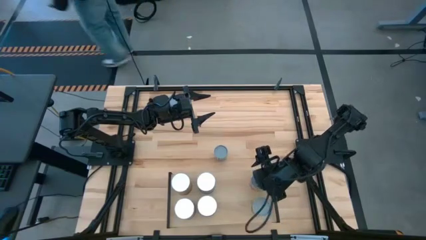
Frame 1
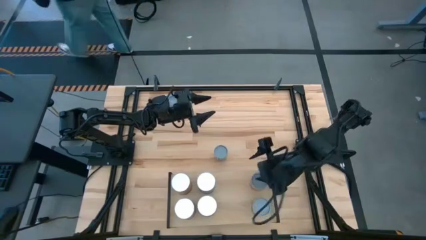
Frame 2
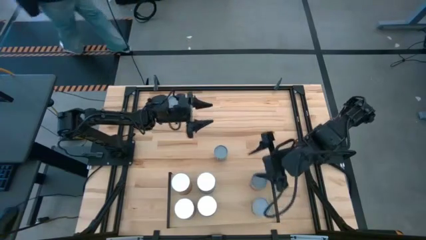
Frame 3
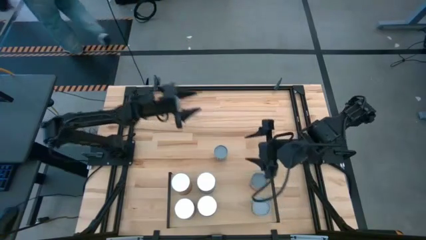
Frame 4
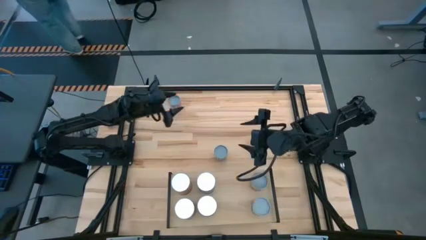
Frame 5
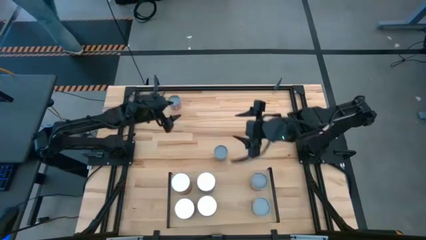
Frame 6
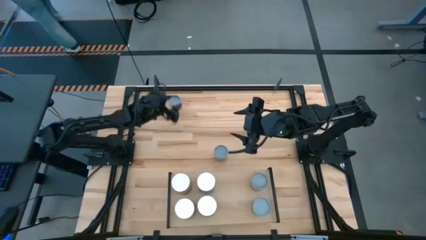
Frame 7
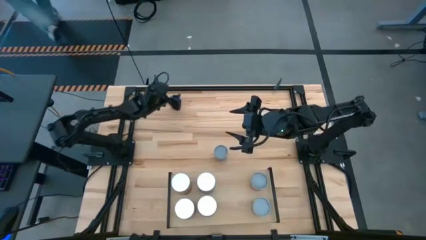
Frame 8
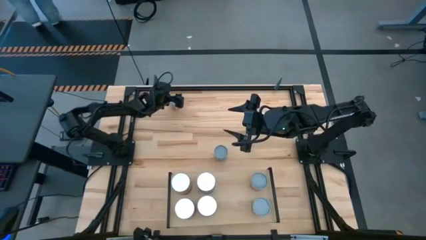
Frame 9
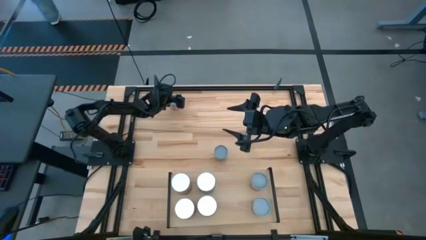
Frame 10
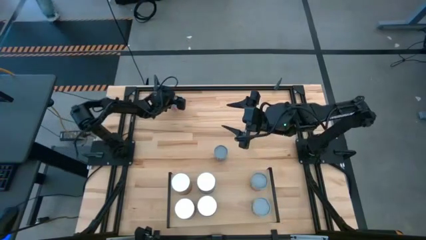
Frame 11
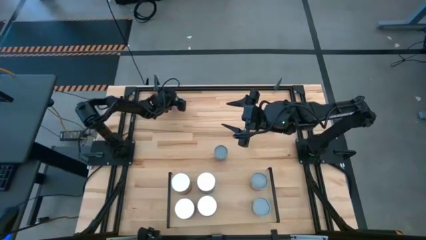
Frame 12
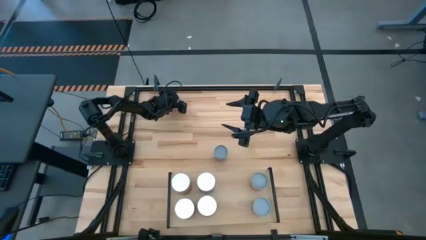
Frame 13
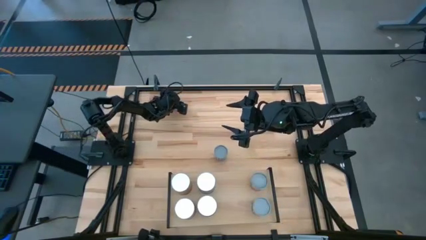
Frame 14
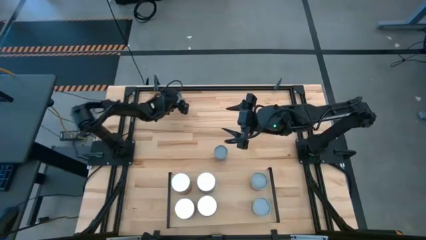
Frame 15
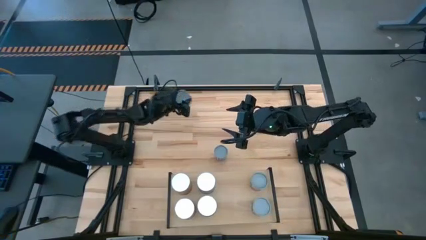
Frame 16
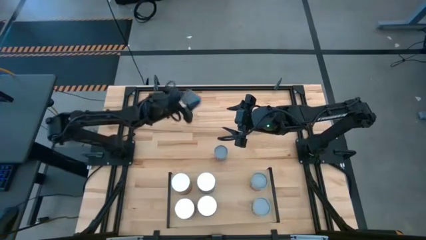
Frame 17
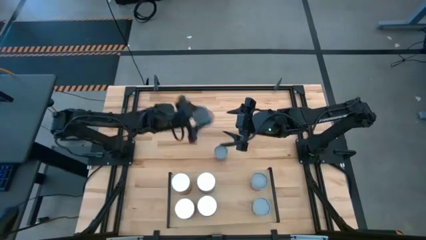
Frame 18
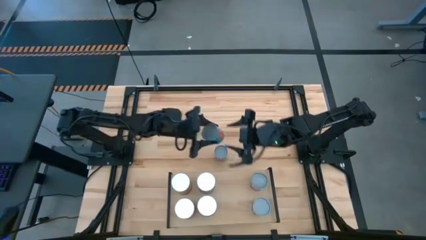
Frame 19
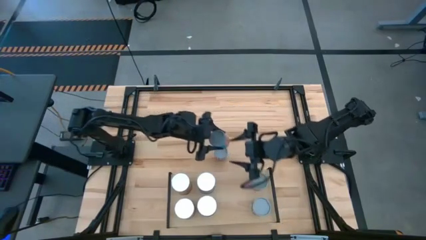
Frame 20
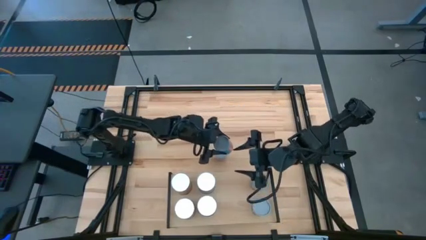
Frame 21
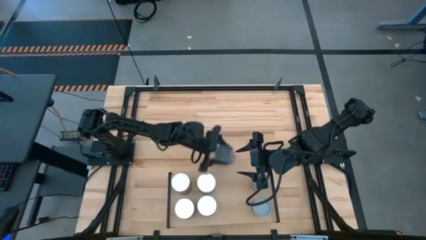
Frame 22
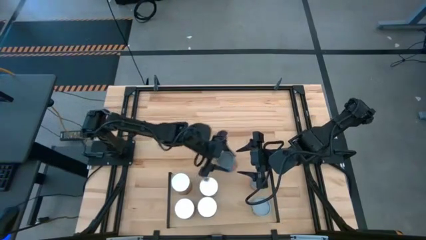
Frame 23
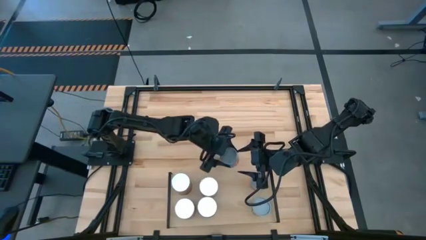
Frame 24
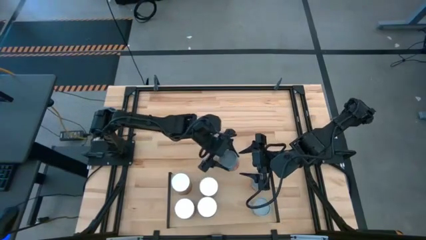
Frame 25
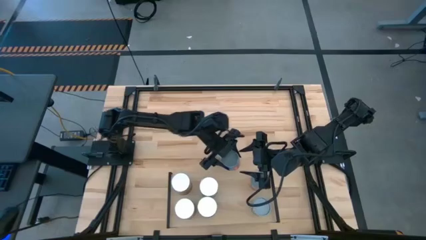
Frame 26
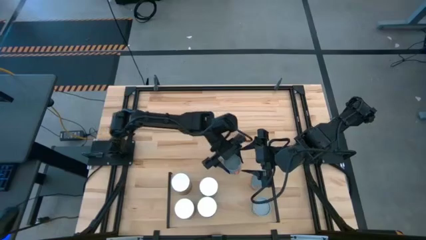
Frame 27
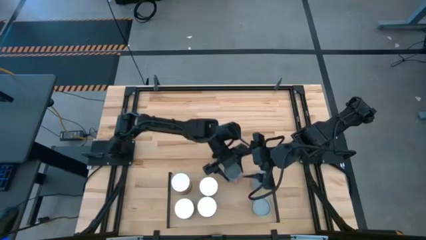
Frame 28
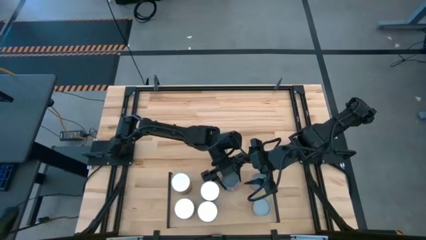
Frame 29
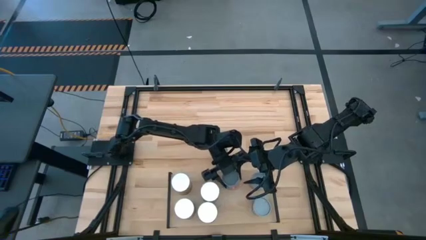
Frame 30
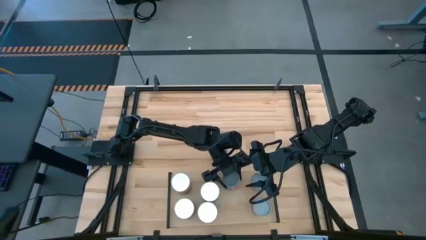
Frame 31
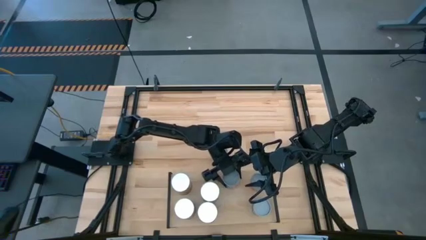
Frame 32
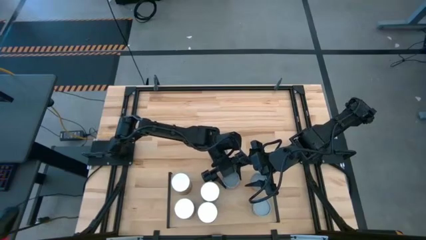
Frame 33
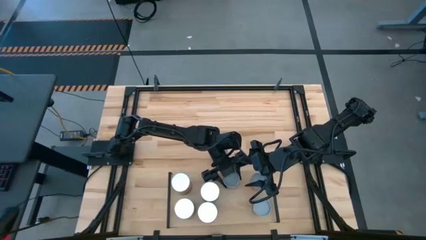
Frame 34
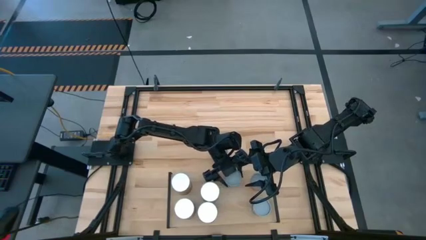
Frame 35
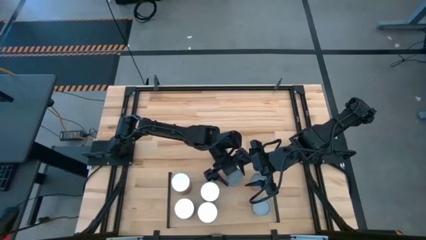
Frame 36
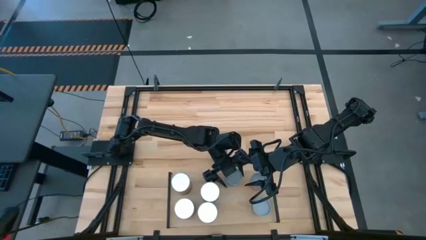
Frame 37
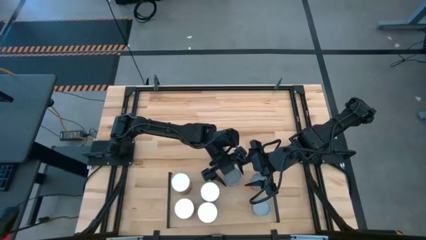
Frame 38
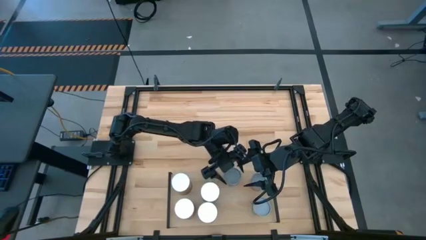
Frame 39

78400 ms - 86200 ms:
Task: Pick and place cans onto a shelf
Put the small canned corn on the shelf

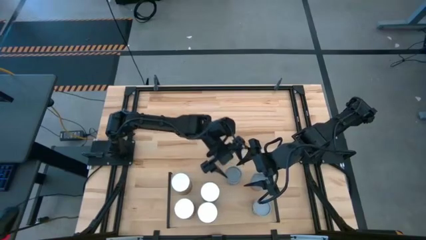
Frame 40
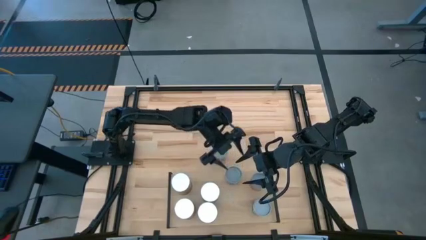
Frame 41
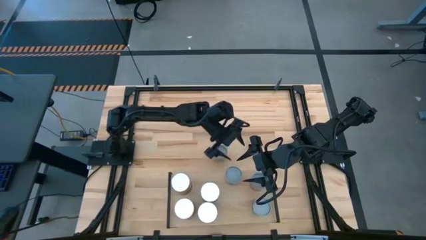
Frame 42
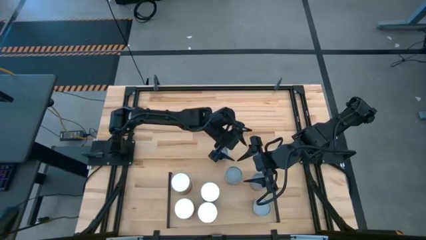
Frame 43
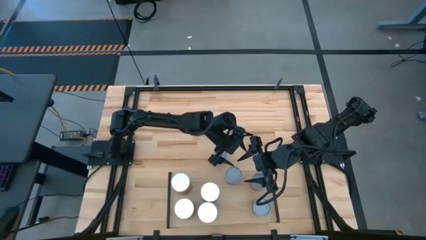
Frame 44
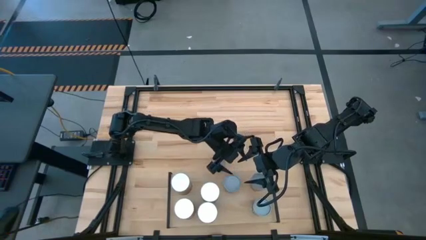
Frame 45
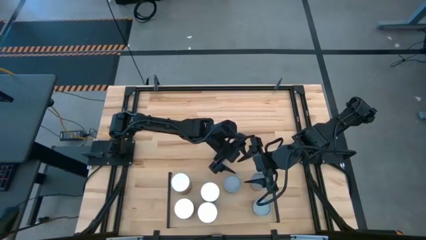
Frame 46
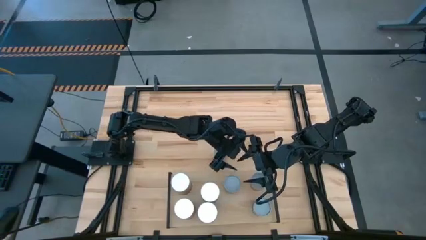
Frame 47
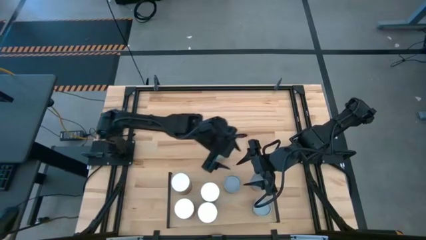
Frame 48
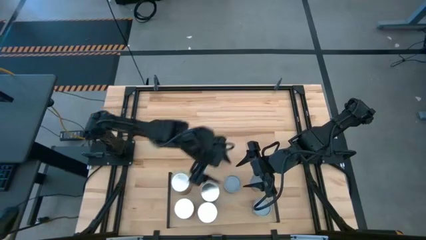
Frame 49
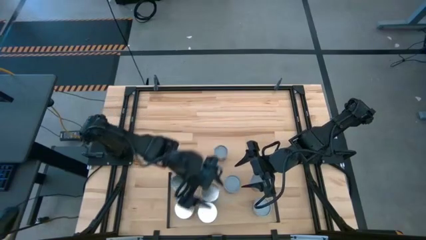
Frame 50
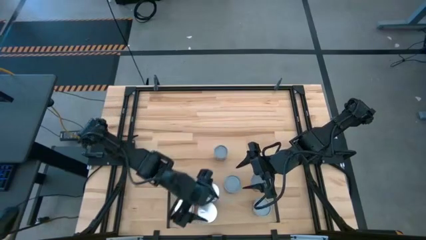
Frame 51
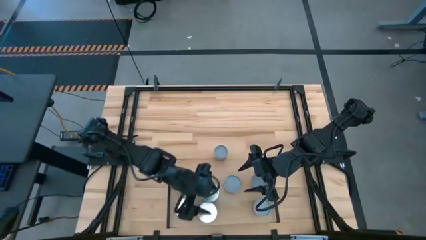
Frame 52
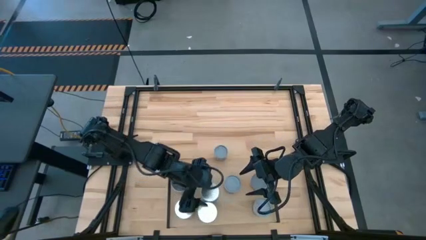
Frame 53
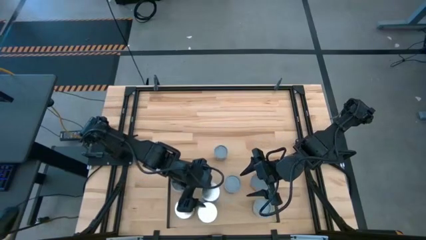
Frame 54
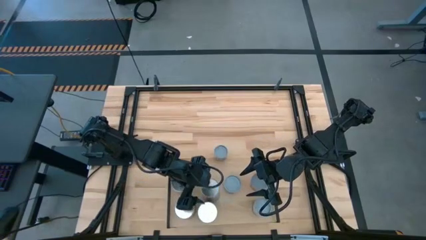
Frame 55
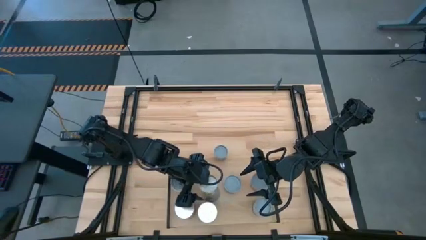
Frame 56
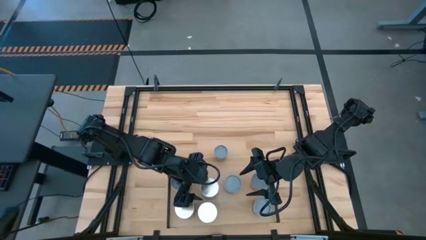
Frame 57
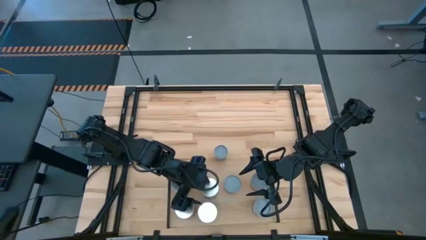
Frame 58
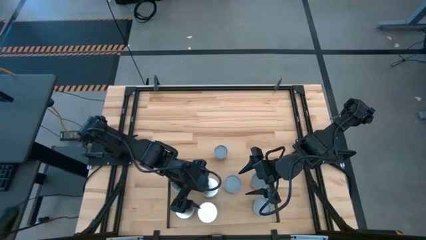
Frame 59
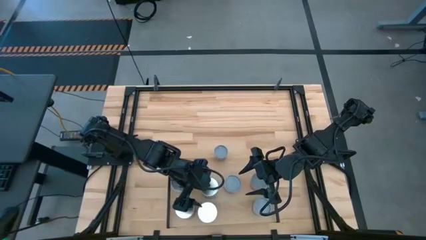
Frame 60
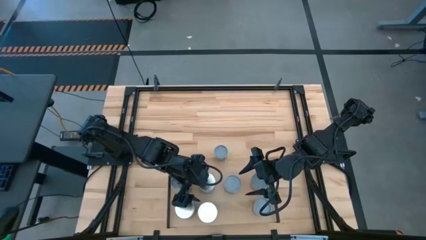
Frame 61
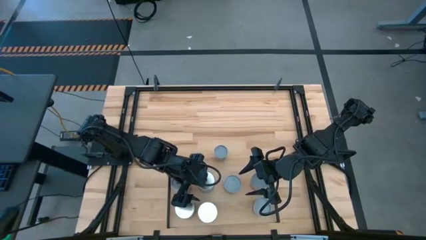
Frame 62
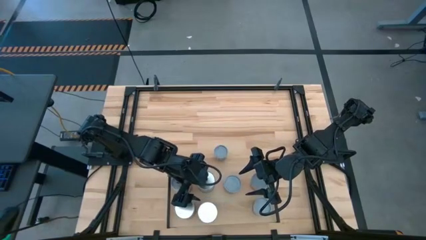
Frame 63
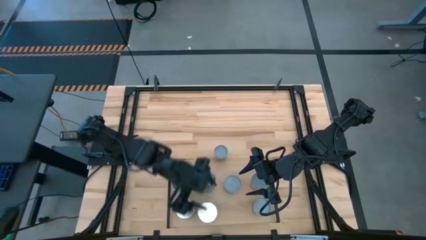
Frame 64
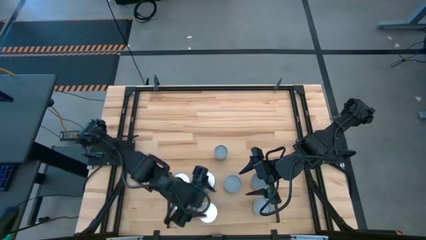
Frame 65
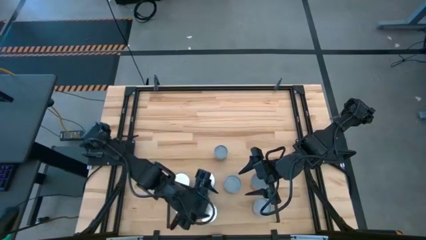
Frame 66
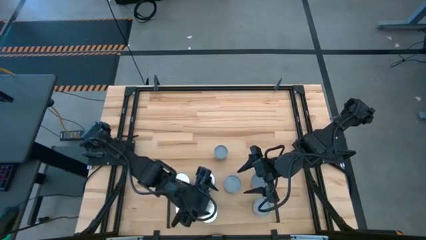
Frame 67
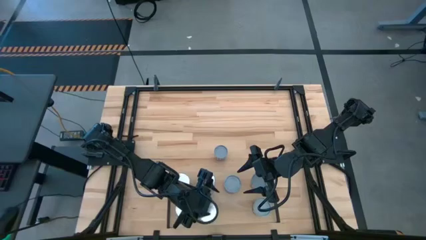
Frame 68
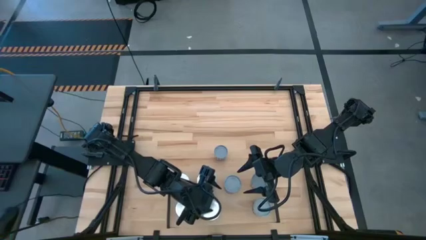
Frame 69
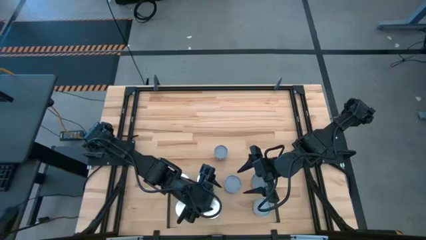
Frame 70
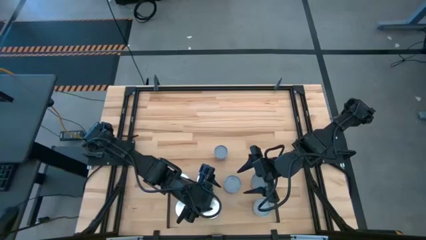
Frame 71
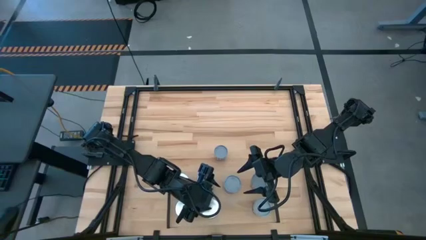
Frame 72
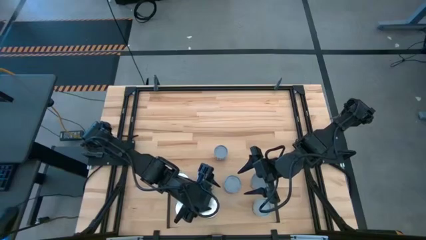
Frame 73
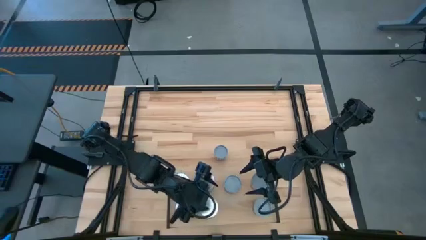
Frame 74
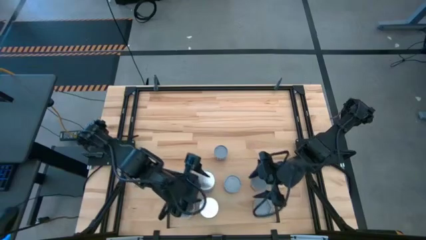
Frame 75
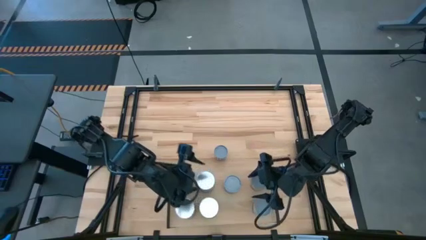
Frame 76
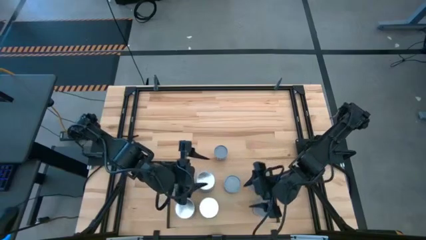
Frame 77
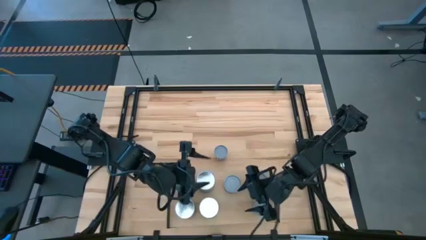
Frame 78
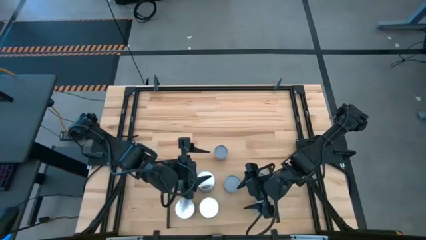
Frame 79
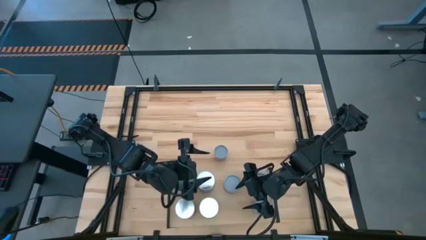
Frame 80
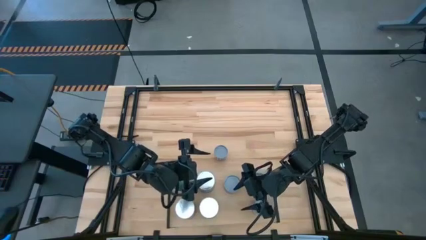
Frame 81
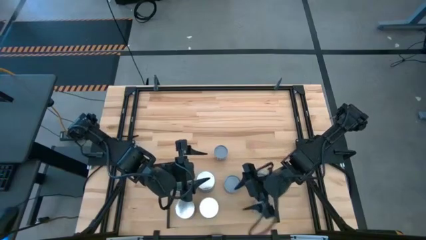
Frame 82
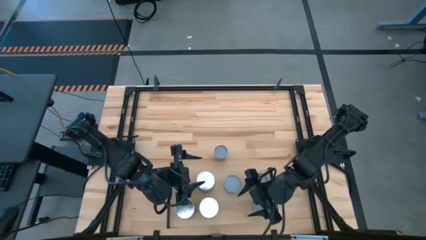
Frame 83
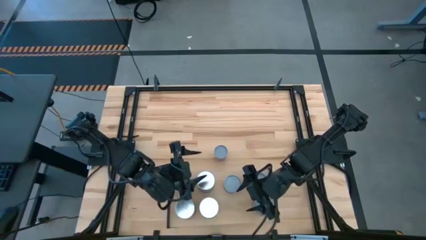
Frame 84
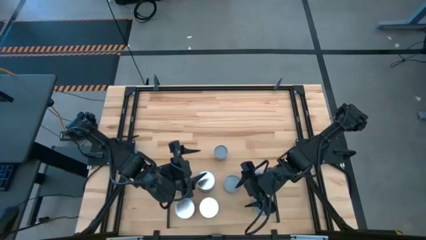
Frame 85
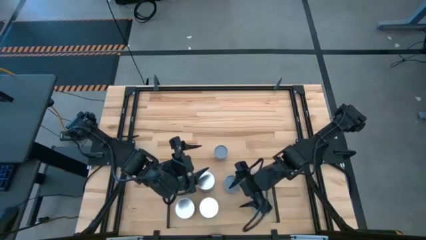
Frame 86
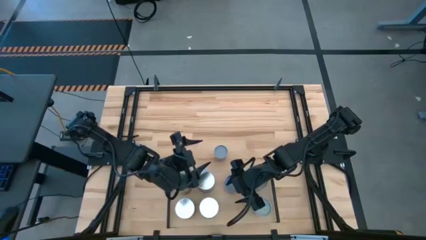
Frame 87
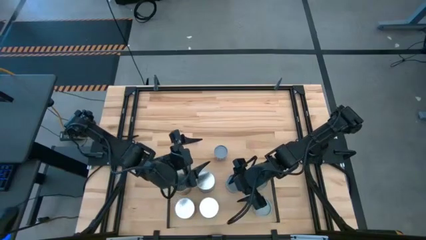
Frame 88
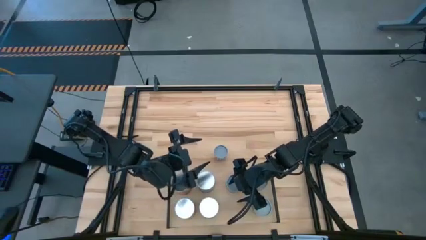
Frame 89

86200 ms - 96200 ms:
Adjust the cans on the shelf
